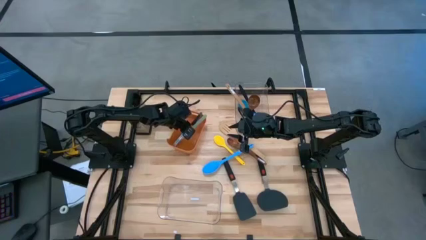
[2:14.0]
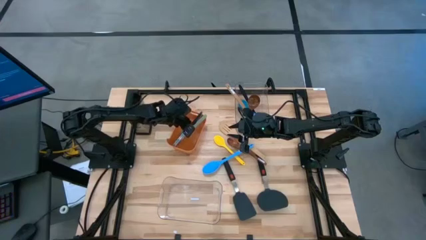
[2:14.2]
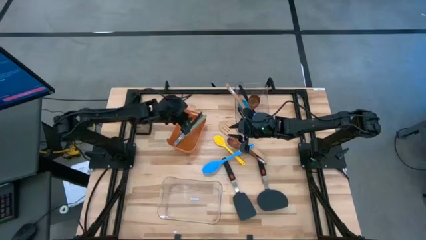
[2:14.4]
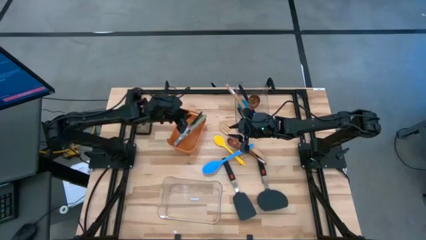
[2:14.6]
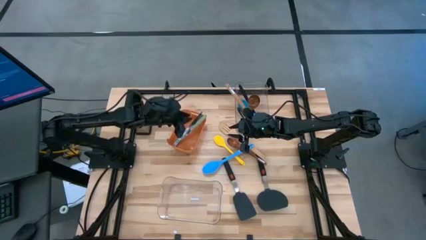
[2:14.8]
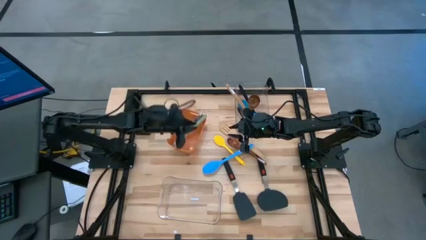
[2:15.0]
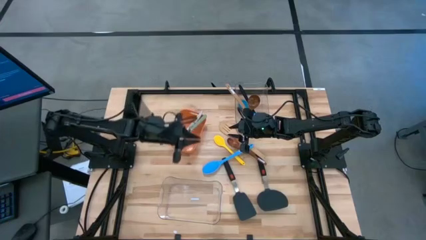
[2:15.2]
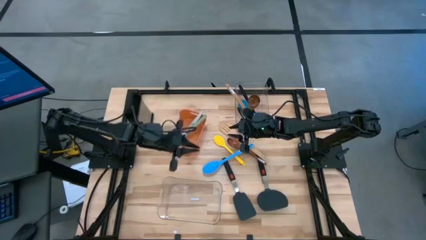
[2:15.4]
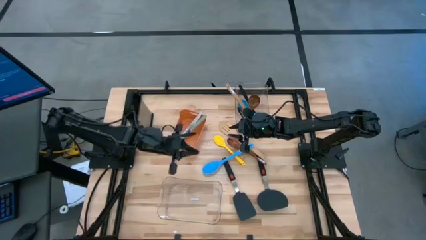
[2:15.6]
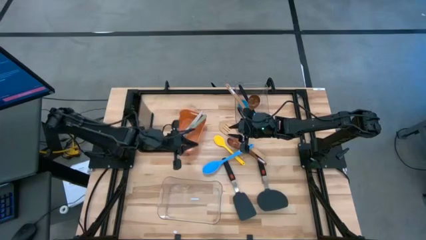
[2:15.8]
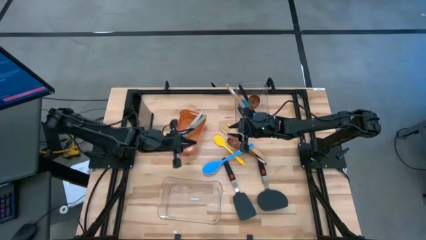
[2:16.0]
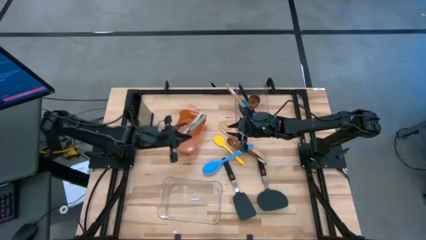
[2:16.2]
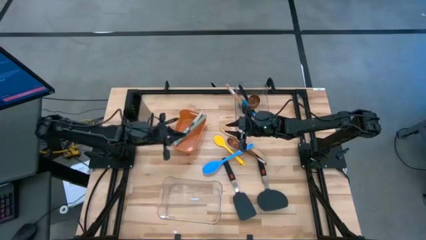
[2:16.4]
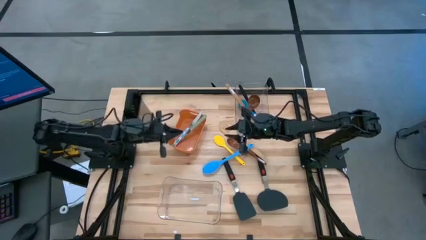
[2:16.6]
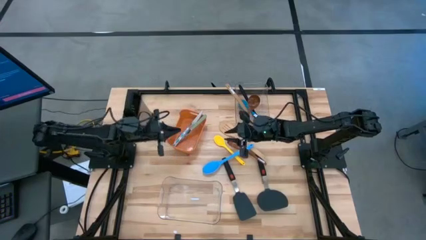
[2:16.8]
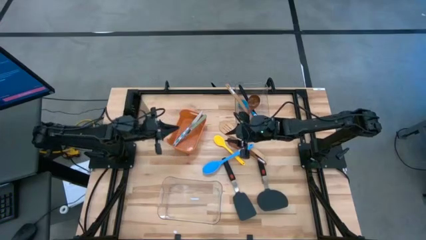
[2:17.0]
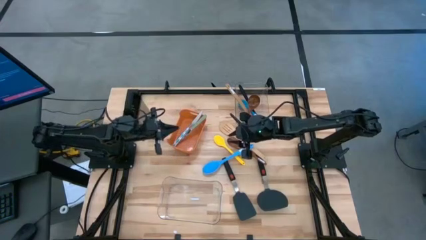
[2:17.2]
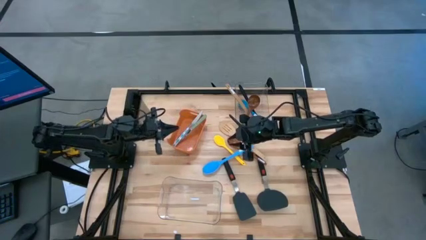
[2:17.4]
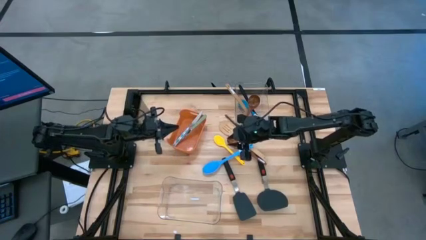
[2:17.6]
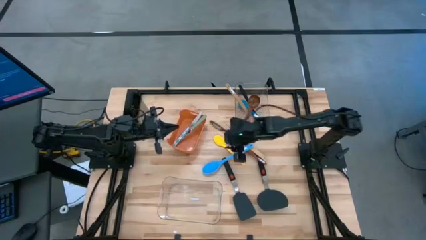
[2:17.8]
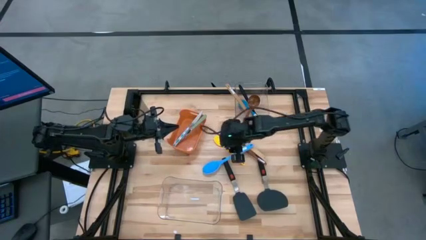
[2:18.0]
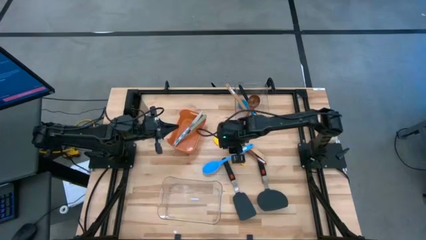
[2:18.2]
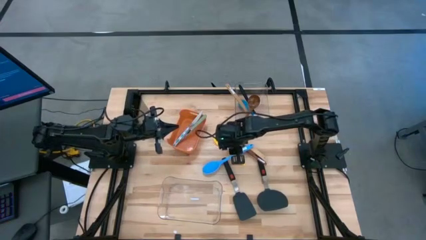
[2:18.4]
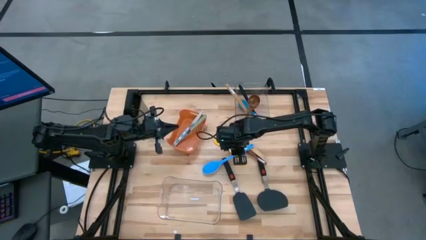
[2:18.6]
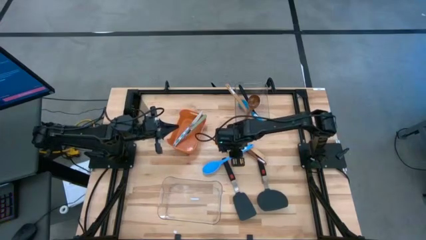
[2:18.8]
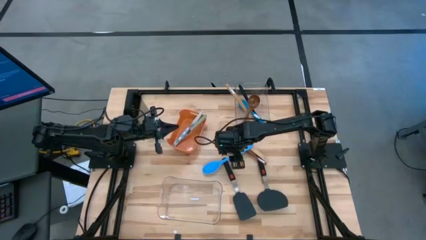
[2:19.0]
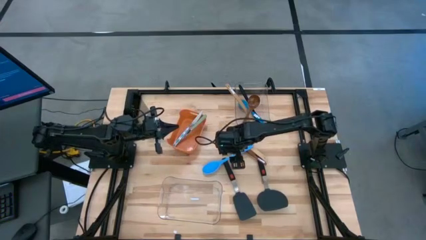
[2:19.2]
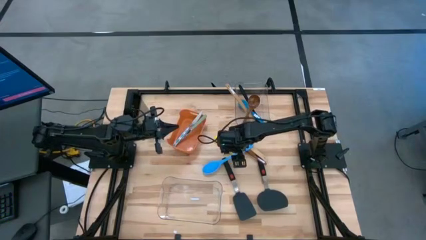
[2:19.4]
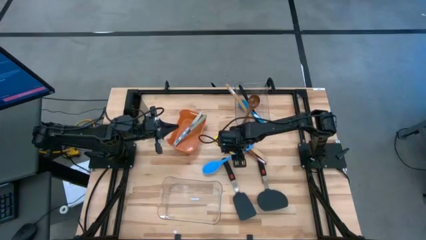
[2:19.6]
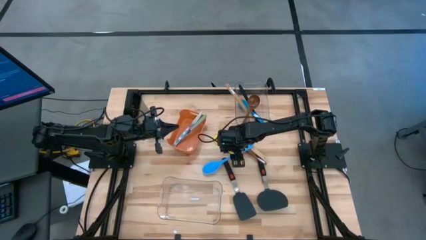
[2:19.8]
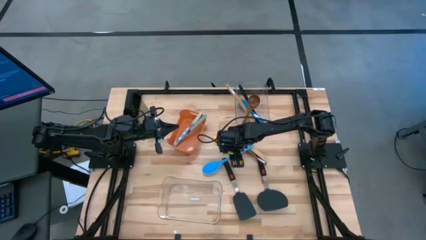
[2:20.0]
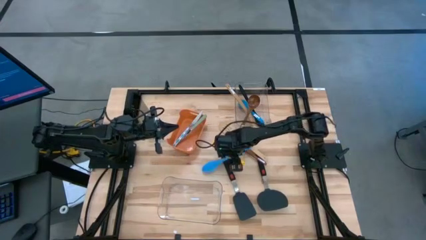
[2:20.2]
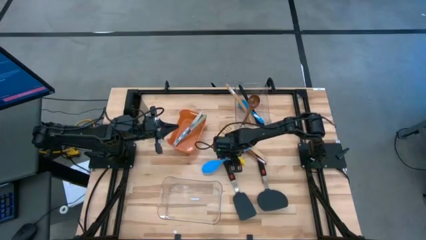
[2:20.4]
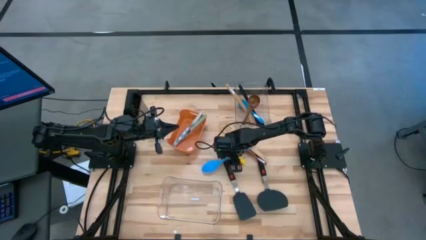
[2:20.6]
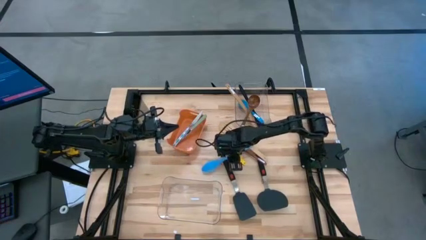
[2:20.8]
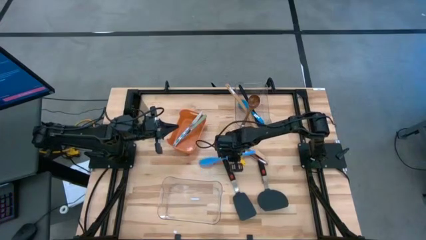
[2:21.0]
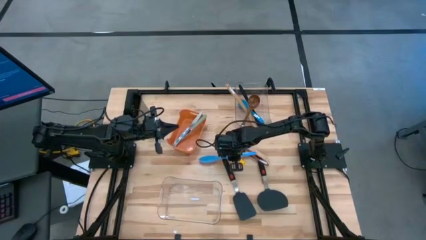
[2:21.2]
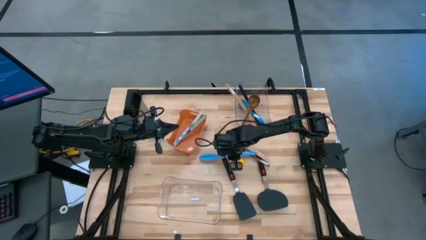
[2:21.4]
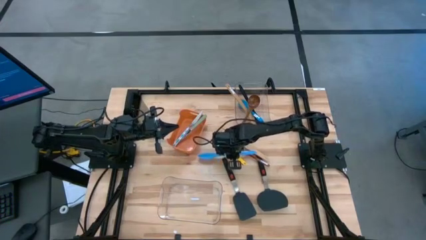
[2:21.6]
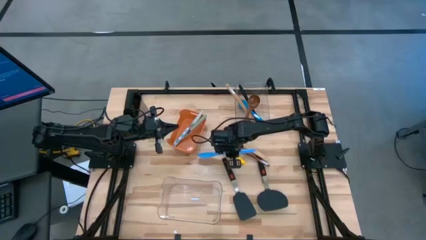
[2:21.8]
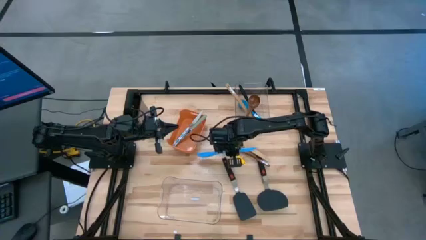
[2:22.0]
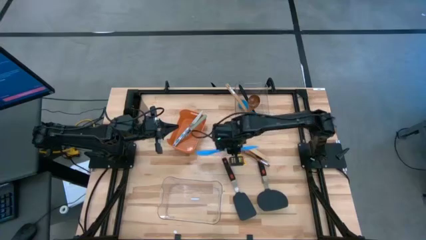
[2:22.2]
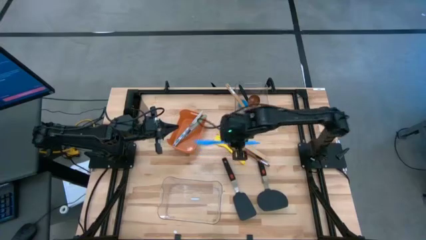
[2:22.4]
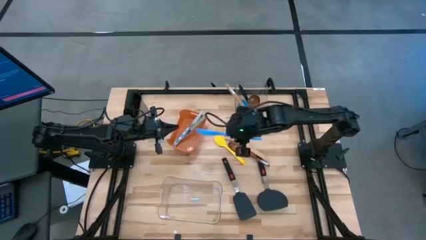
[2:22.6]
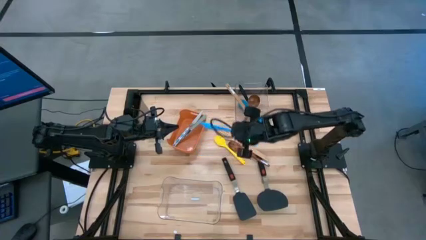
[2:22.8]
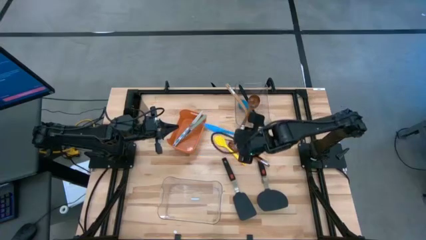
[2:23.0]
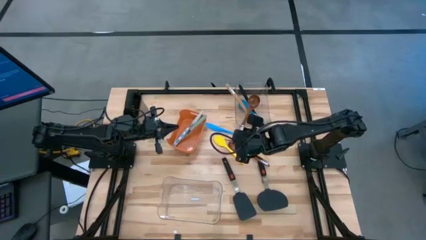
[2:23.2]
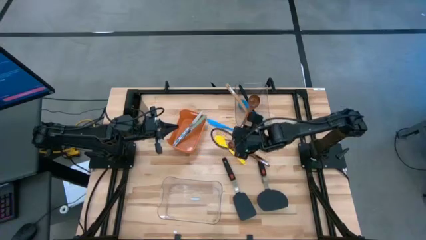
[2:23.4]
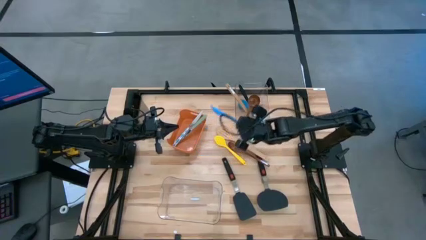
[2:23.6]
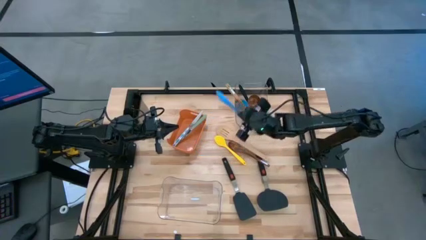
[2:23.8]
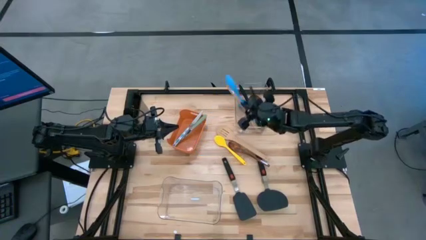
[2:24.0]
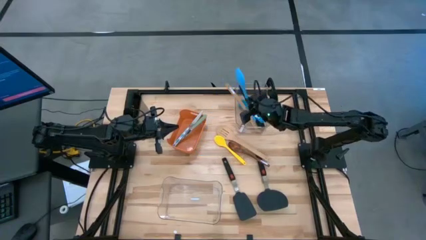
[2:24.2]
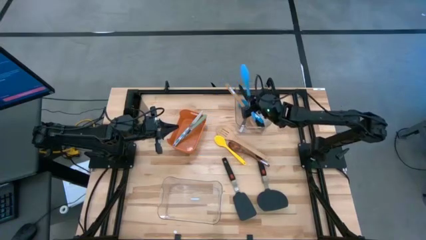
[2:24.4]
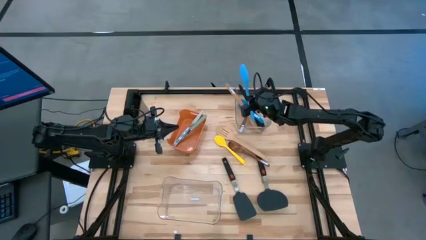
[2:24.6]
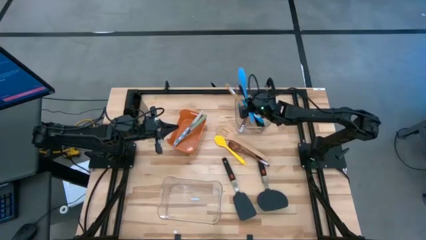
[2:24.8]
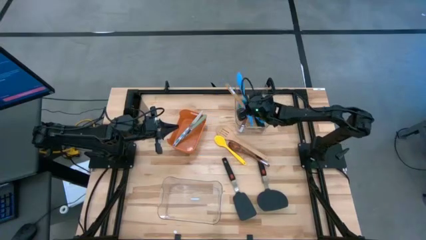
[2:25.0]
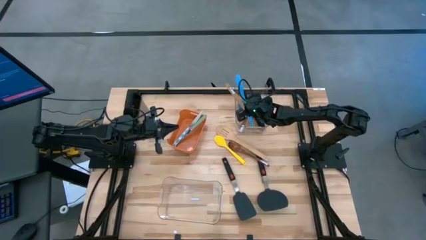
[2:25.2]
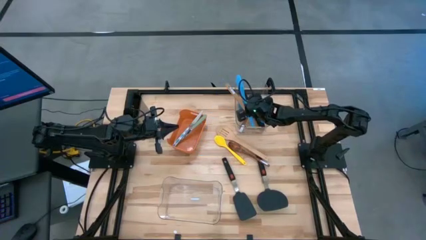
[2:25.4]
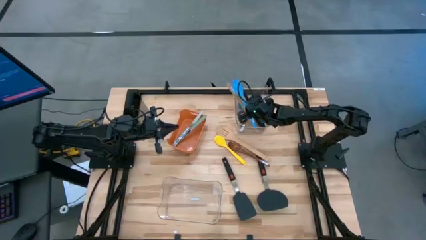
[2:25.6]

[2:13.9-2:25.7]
Task: Pick & Place Kitchen Items
Put the blue serving spoon into the top transparent bin

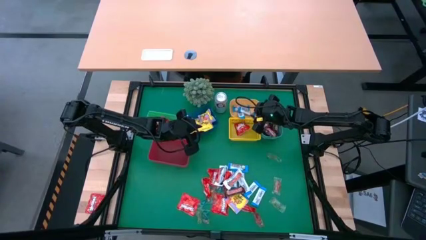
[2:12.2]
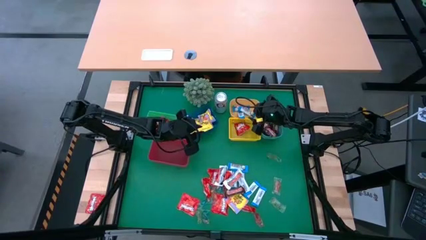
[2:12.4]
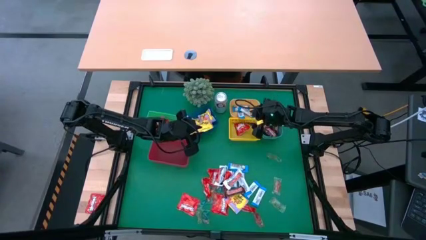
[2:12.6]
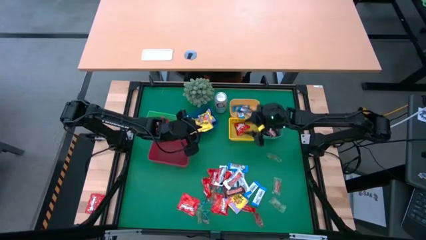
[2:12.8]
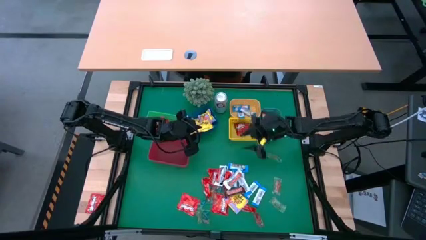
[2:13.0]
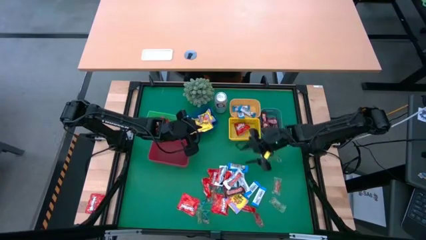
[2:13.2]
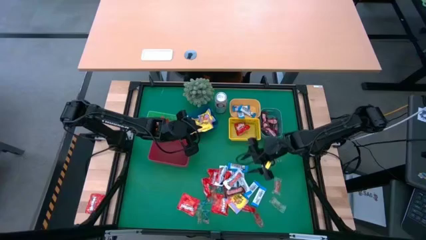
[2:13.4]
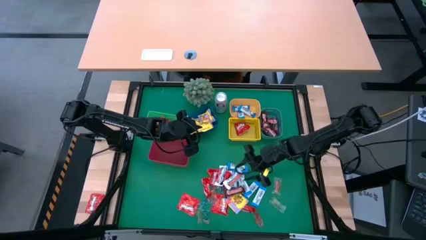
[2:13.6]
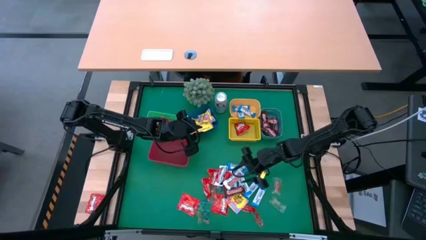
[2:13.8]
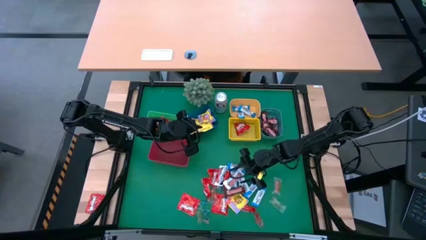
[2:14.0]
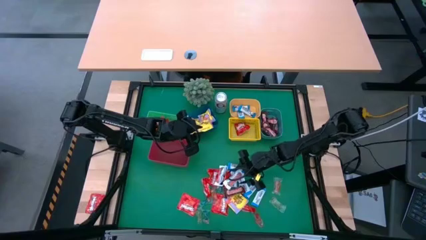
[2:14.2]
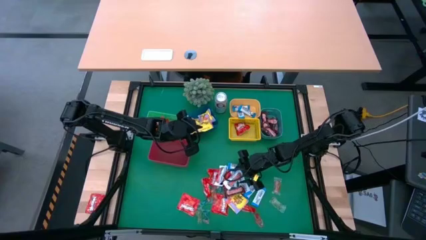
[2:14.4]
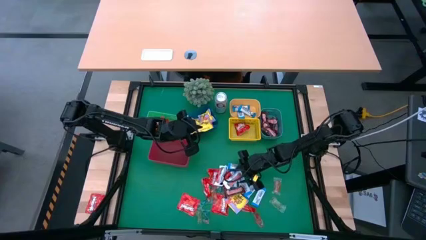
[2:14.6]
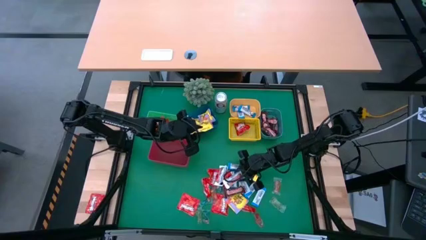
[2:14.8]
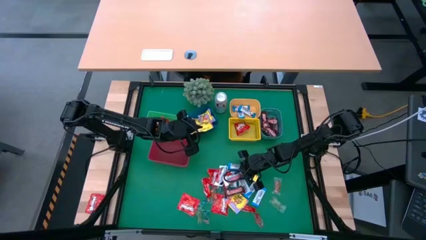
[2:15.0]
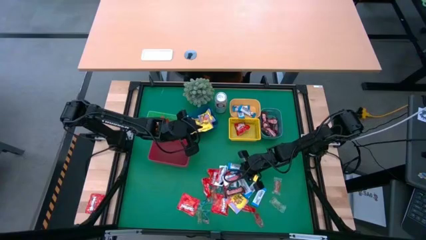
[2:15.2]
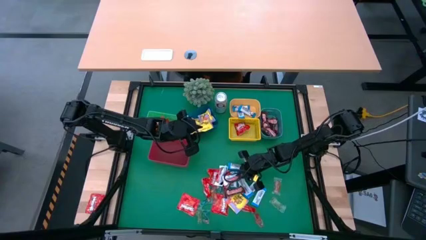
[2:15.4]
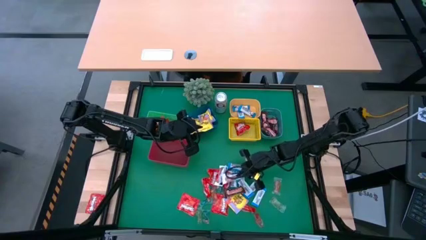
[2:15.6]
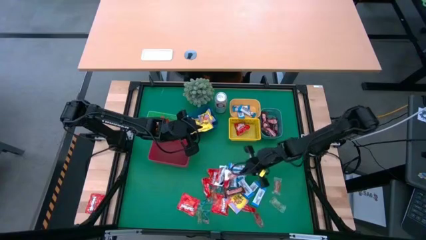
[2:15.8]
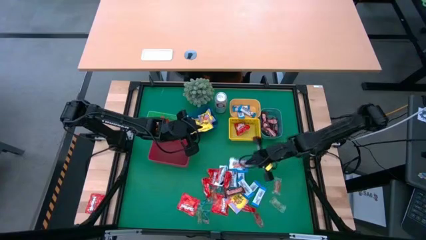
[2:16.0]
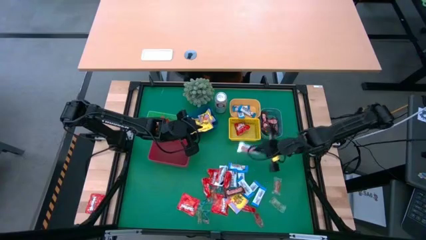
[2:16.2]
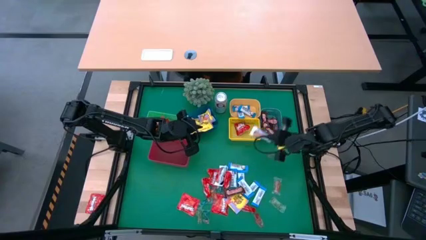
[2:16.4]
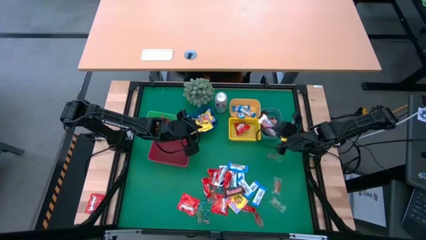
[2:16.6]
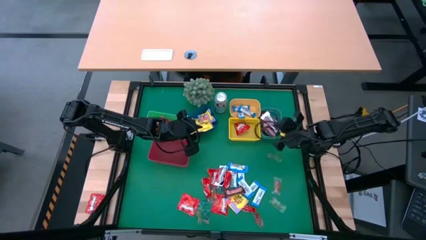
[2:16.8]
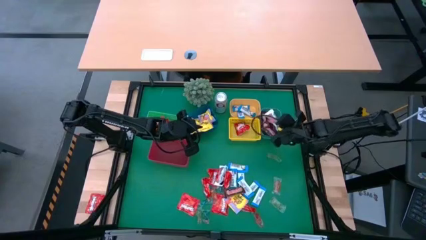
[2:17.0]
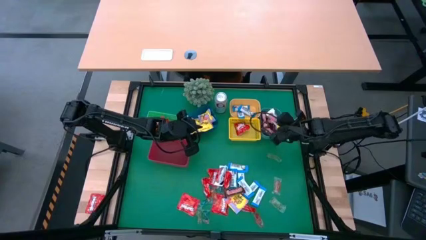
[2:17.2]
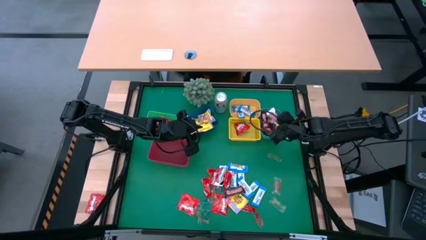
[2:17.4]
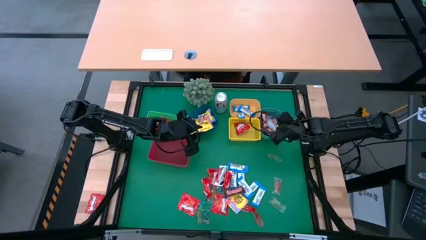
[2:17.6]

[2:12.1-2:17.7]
Task: Sort candy
Put the white chocolate bar into the green bin
